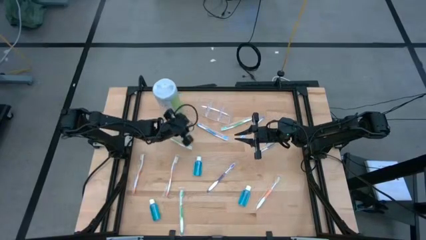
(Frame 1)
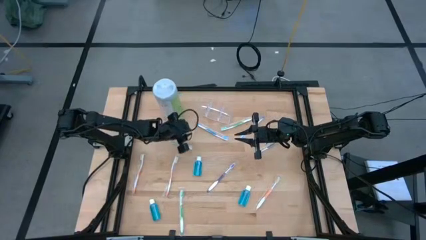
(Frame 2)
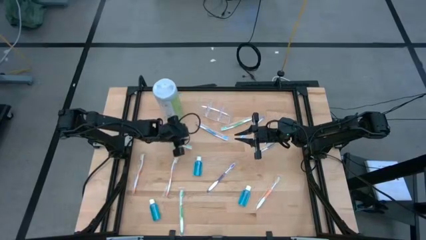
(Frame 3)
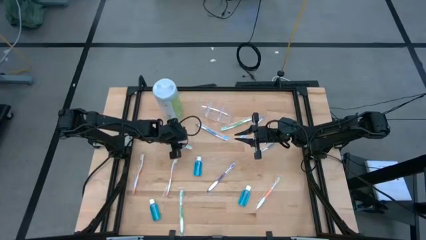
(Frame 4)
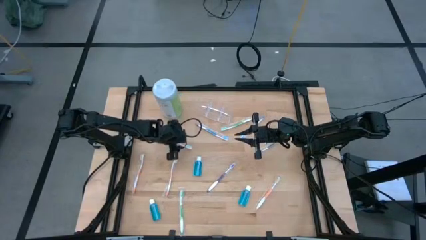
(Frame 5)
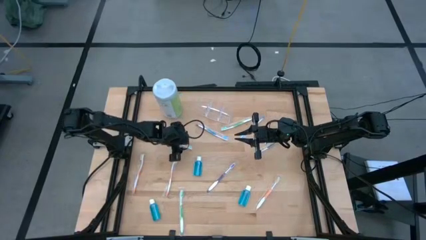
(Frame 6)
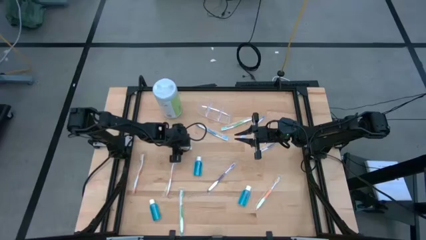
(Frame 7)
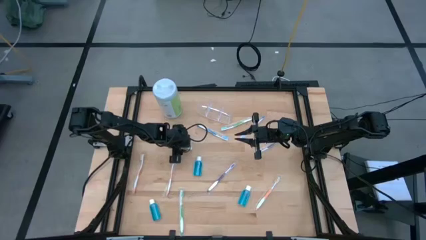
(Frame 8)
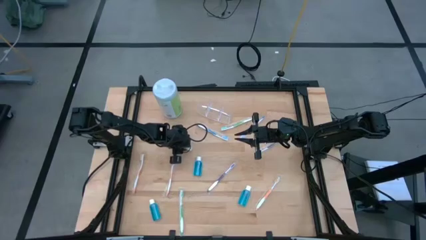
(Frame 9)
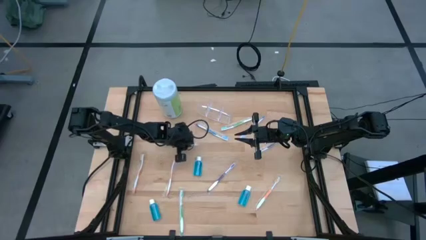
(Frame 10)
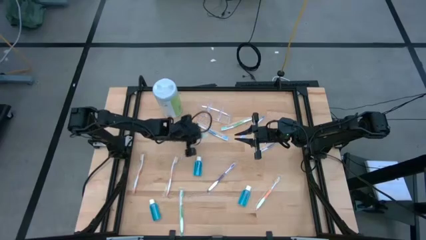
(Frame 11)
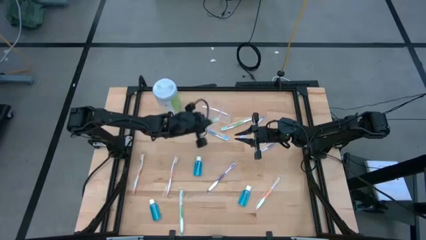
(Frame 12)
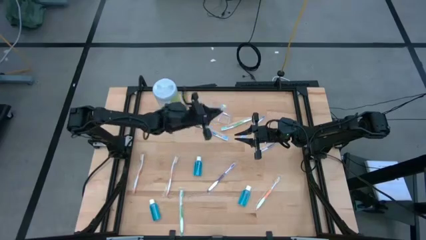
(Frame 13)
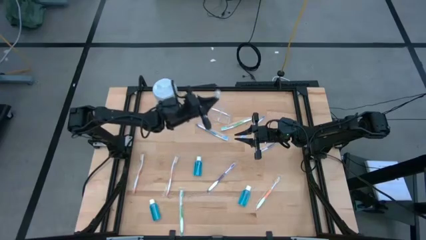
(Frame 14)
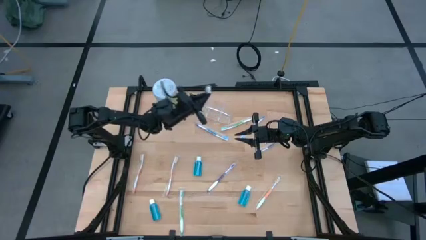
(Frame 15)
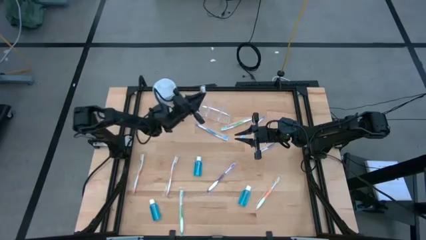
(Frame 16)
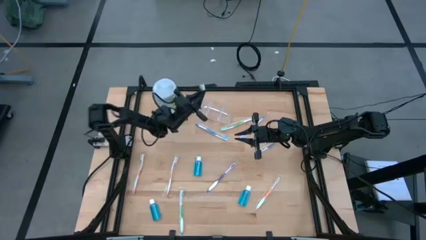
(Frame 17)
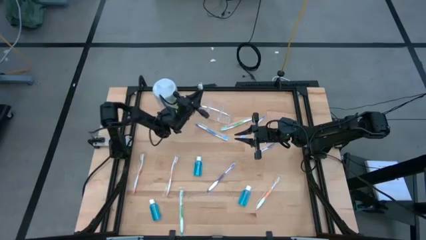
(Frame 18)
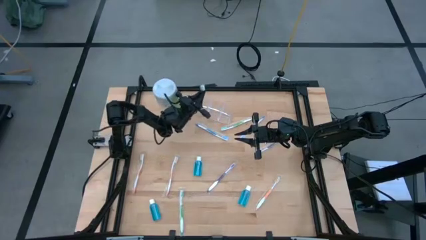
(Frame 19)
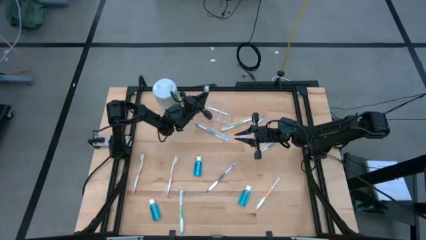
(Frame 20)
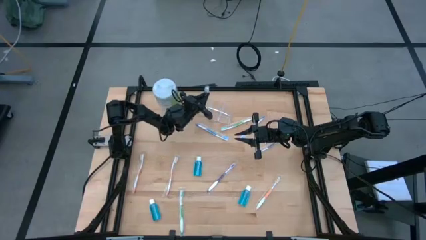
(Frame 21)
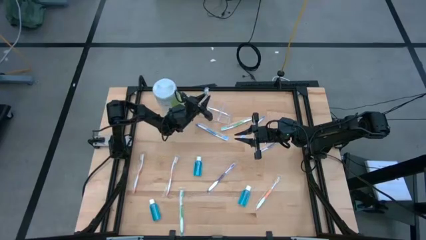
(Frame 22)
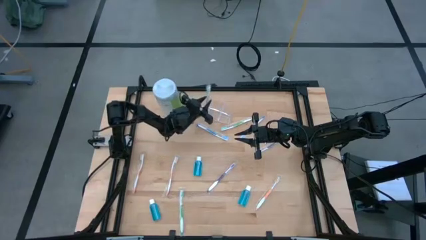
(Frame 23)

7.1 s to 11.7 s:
Task: Pick & Place toothbrushing station
Put the middle green toothbrush into the transparent organizer

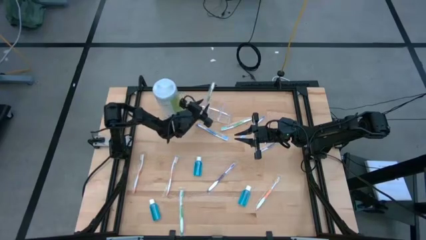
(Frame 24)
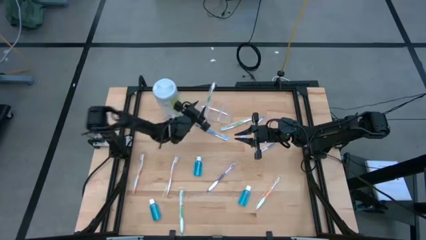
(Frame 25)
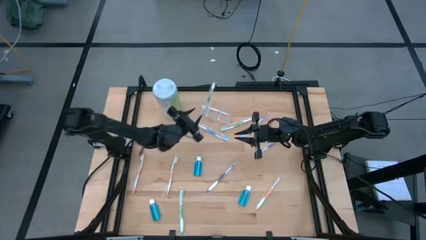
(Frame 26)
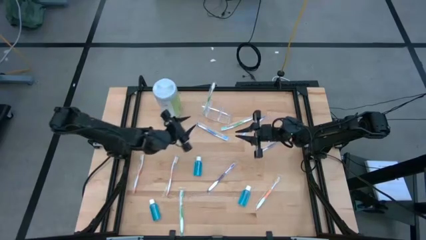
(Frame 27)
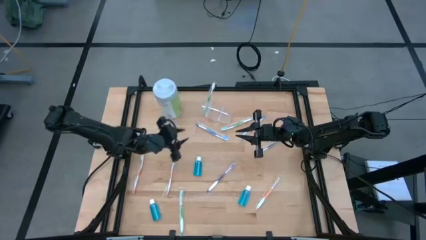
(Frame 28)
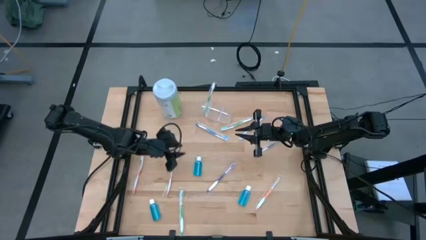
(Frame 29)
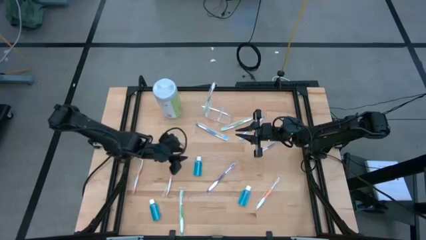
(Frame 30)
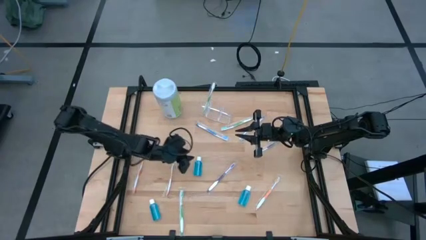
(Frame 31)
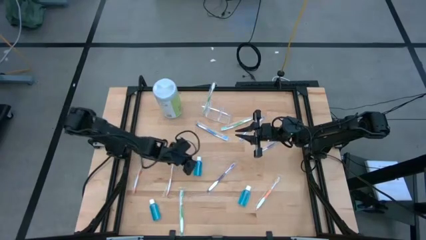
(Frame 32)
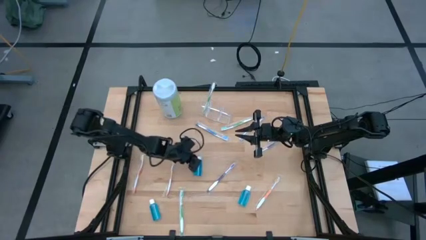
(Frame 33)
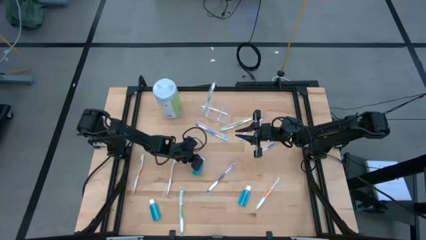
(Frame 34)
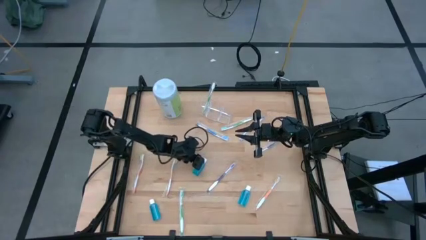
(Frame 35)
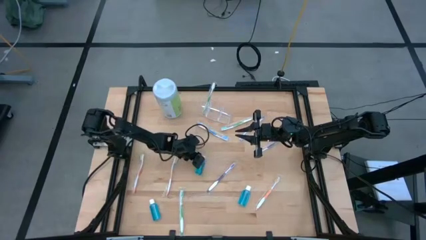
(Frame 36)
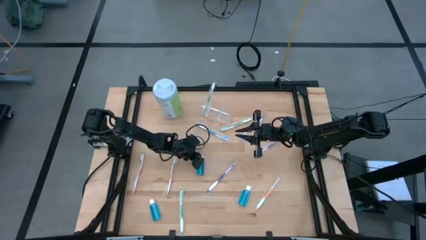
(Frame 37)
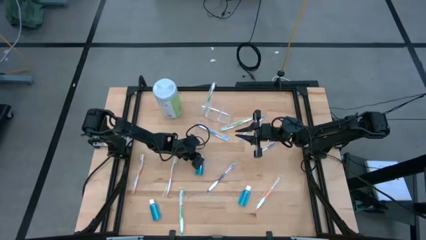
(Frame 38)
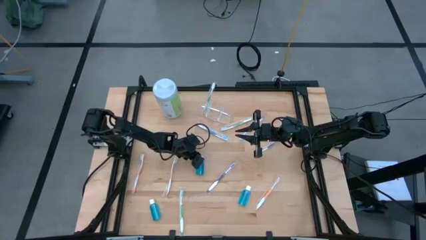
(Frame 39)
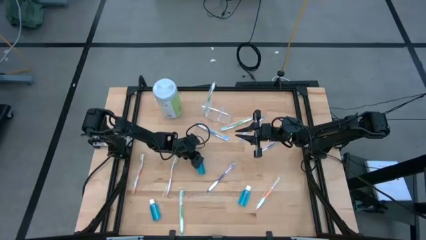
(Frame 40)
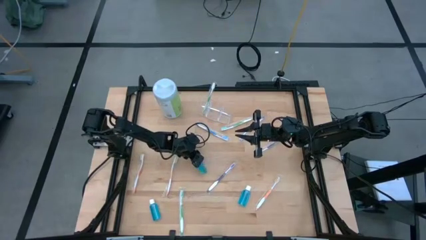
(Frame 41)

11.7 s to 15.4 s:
Put the top blue mouthwash into the transparent organizer

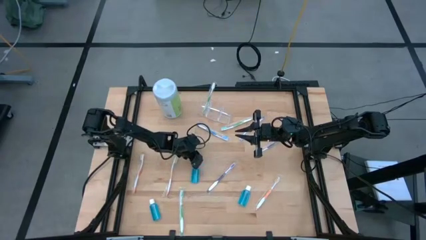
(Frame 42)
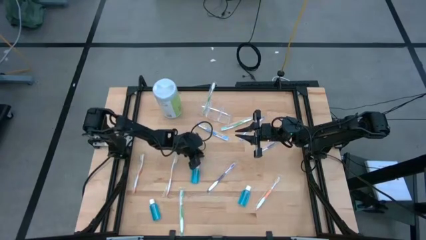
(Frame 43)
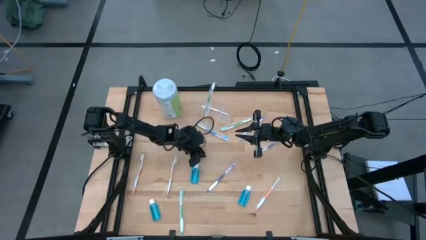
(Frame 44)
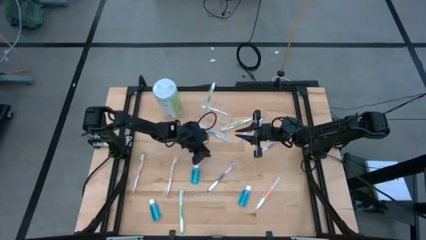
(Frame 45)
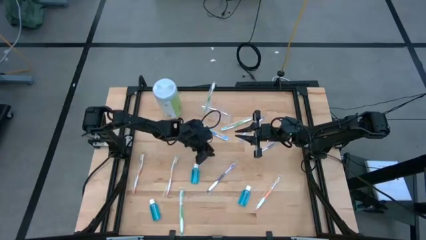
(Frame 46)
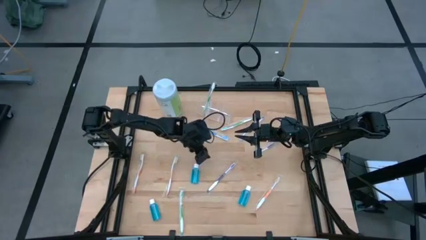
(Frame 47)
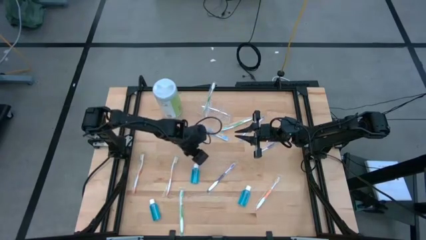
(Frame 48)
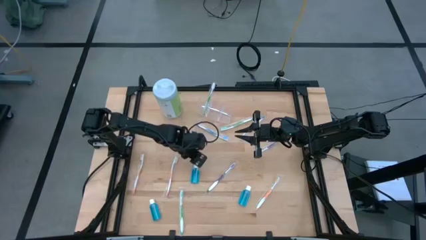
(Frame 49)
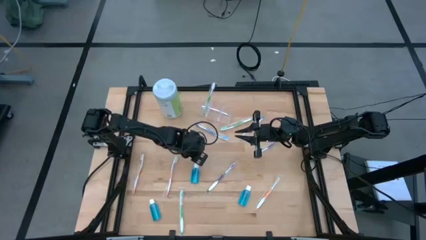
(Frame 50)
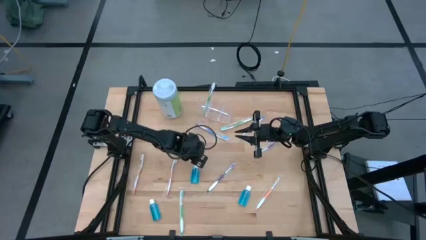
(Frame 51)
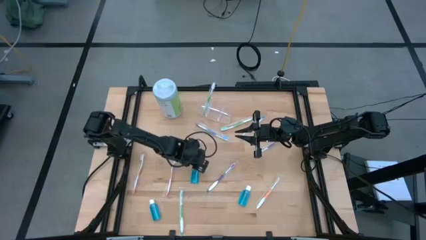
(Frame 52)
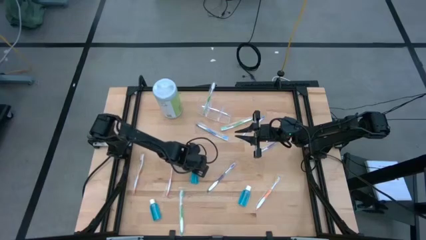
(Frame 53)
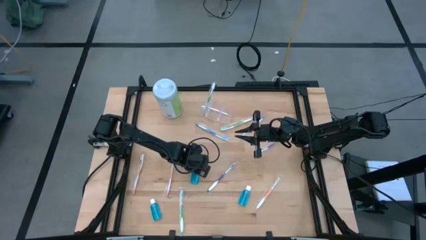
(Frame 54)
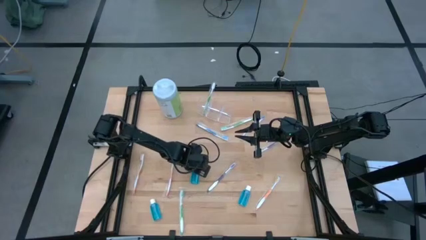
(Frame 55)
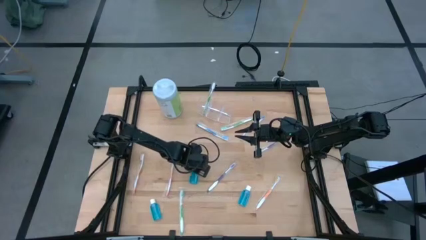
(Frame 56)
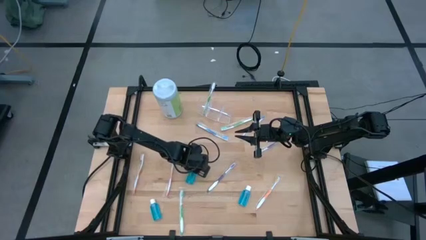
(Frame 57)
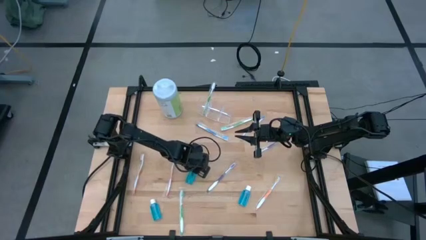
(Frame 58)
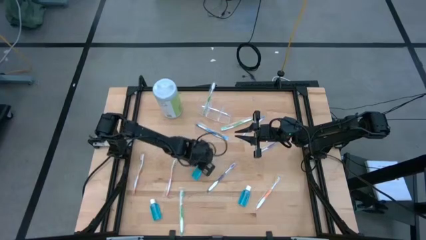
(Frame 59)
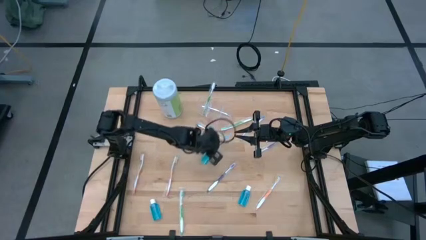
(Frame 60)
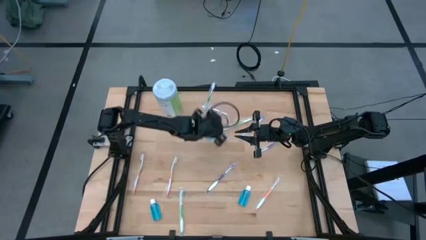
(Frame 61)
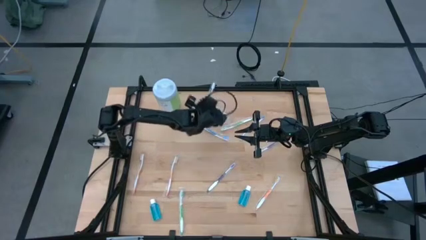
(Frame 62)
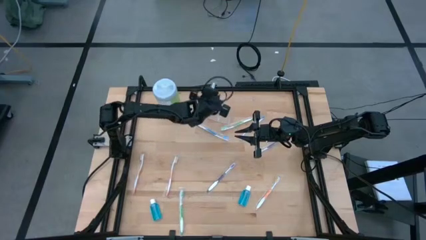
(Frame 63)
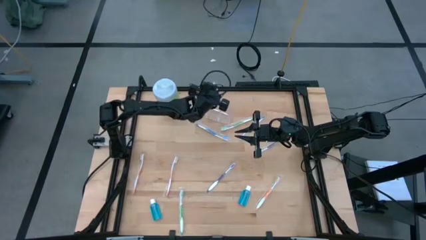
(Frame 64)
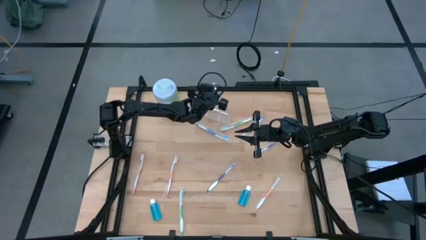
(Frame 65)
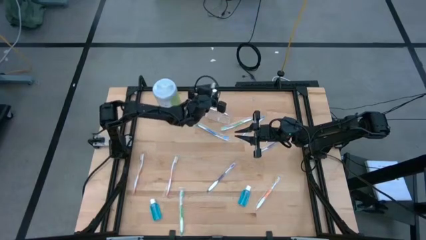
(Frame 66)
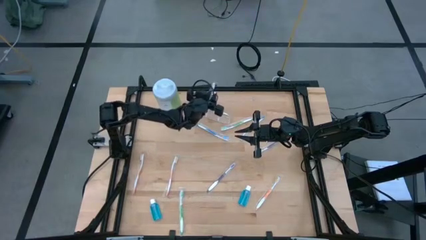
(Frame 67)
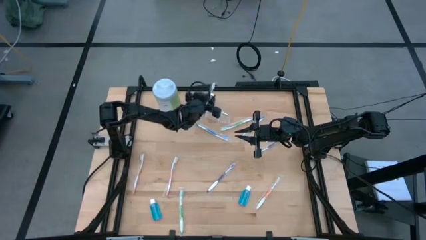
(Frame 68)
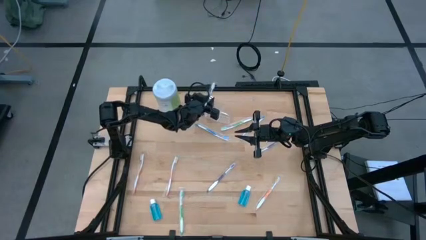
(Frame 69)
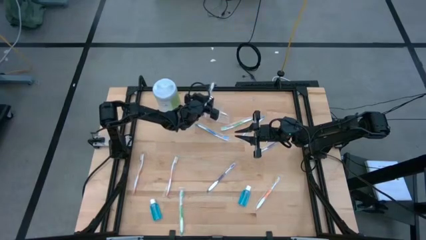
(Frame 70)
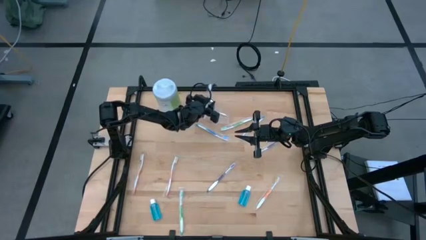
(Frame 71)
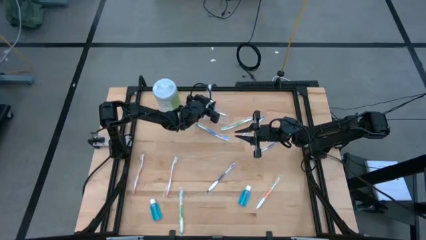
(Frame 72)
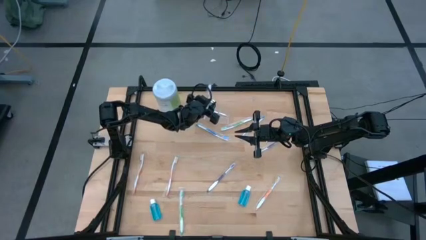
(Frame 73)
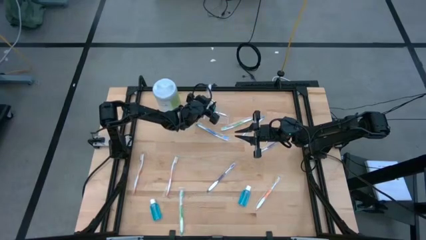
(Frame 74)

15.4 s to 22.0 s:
Put the top blue mouthwash into the transparent organizer

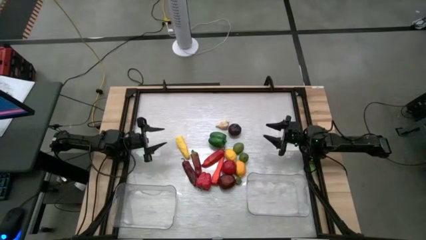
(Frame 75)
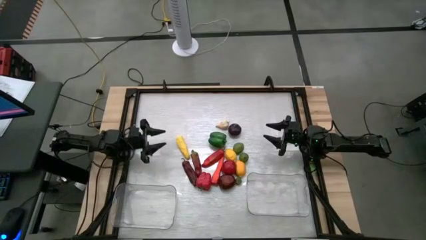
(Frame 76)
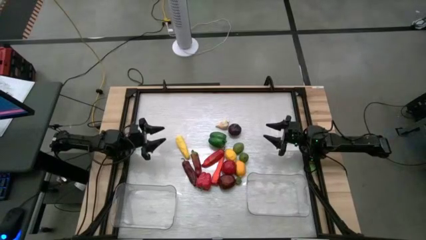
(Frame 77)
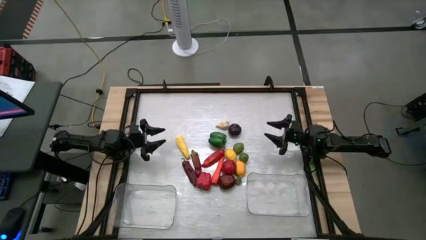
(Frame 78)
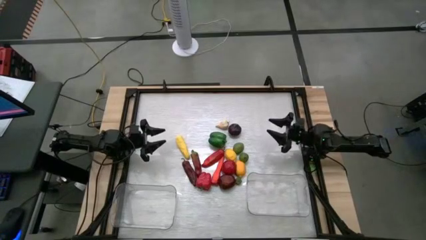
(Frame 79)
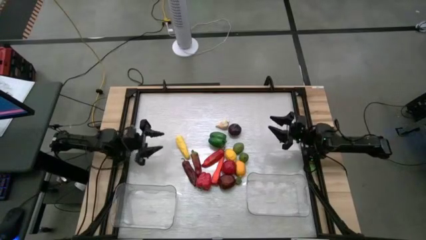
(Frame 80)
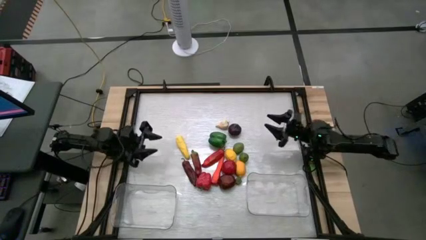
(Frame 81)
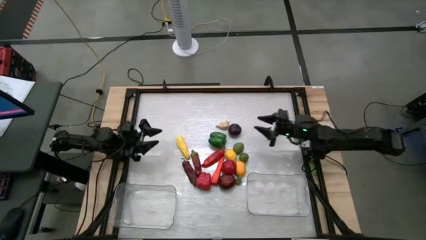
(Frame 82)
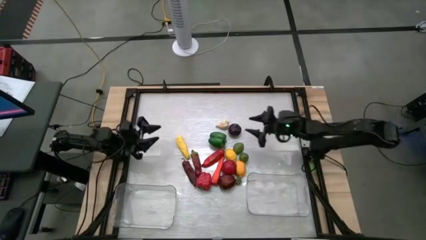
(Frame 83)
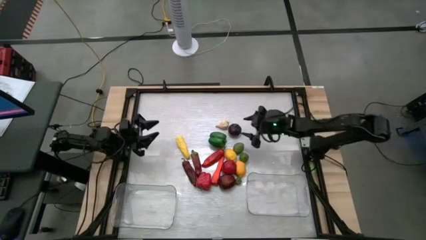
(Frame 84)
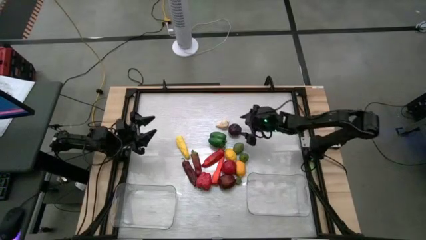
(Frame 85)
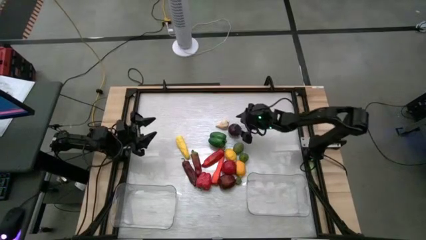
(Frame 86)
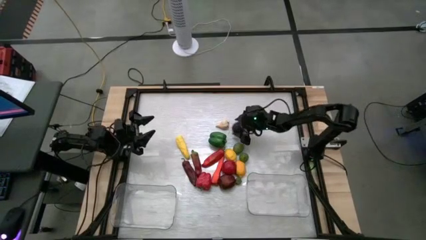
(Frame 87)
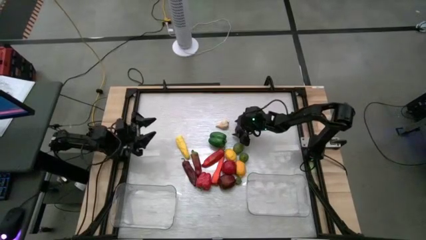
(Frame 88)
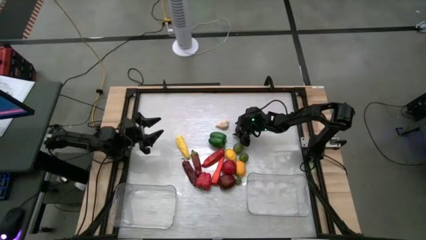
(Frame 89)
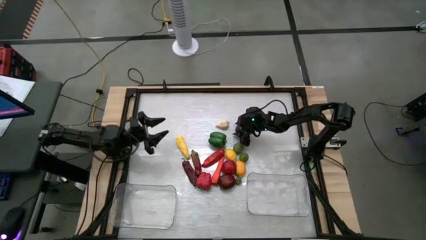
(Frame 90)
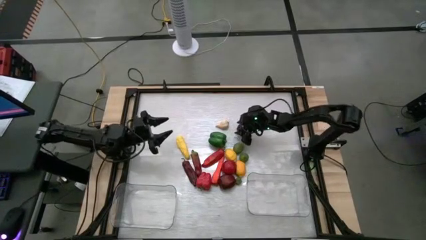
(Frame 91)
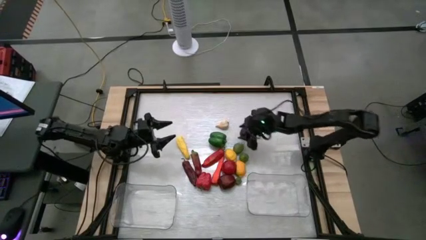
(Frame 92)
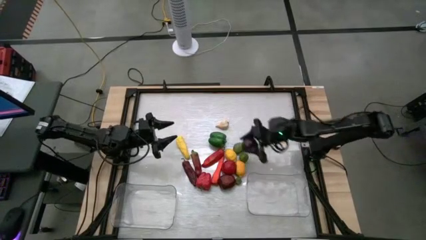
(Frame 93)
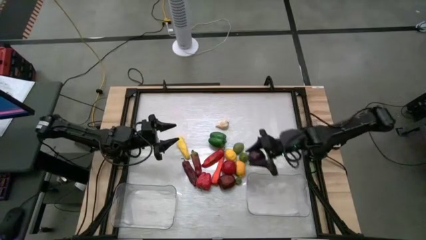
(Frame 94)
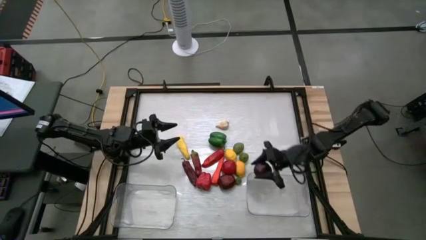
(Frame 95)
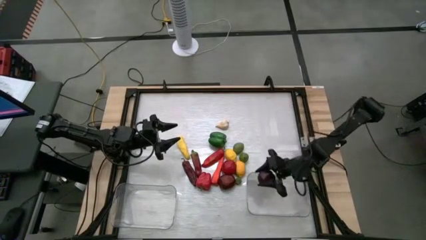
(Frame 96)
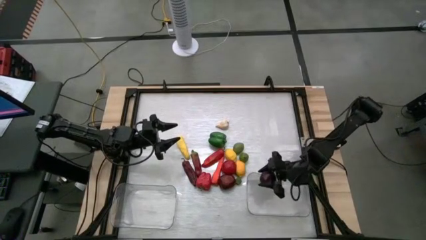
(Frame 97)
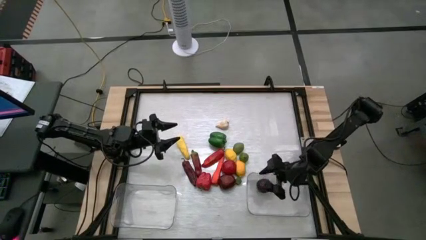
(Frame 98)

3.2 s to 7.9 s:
Task: Sort produce into baskets
Put the onion into the right transparent bin
